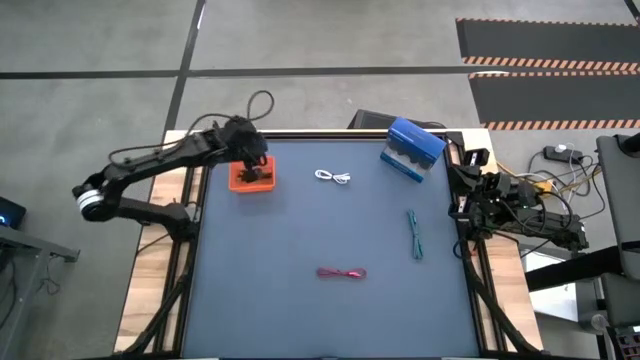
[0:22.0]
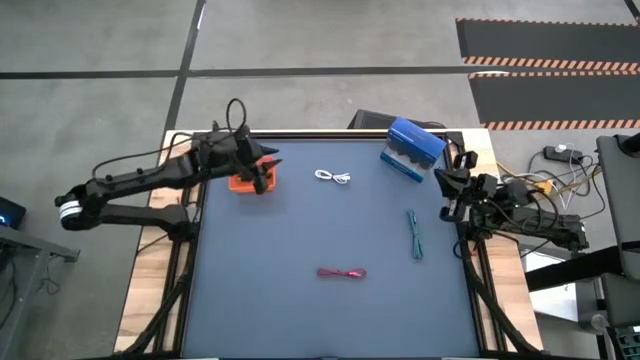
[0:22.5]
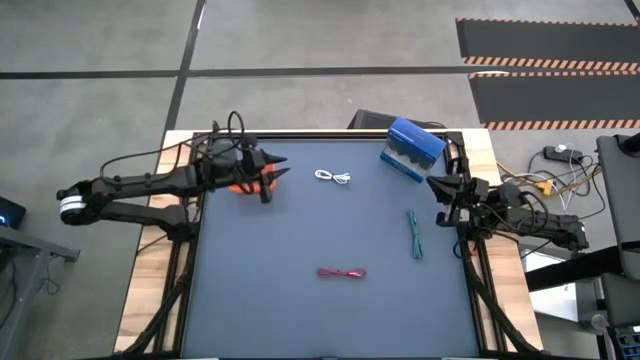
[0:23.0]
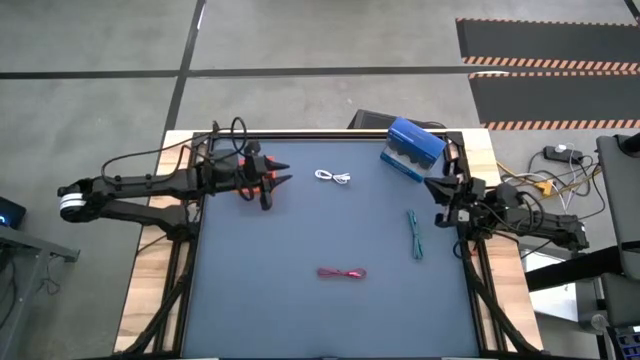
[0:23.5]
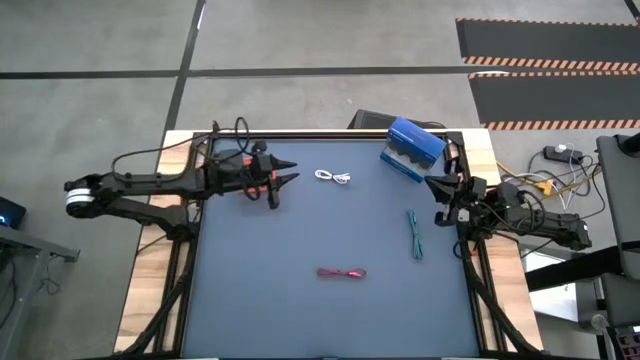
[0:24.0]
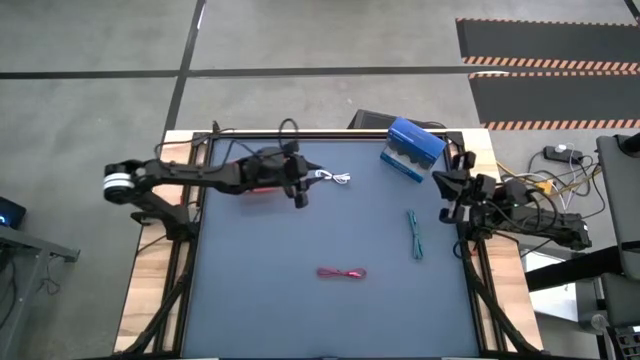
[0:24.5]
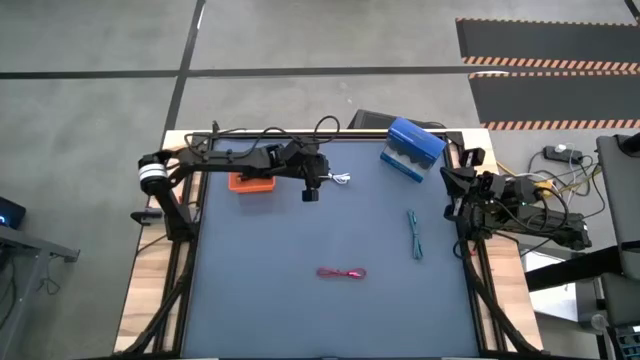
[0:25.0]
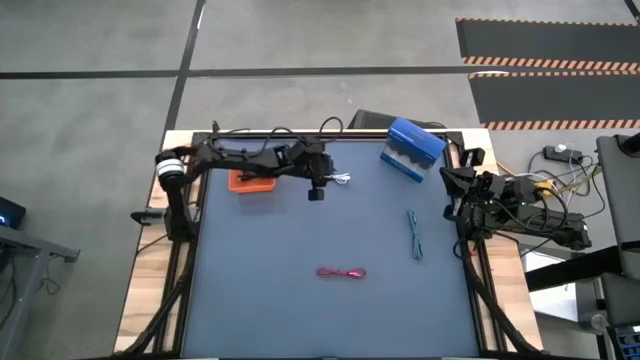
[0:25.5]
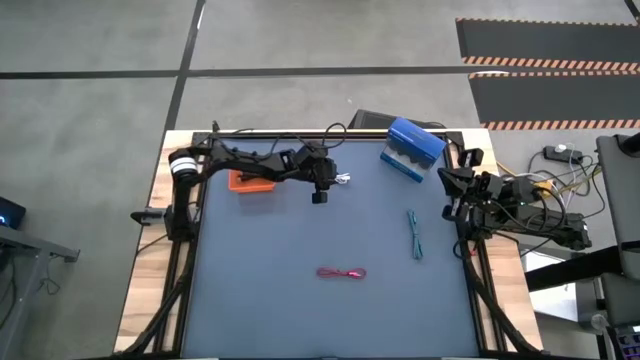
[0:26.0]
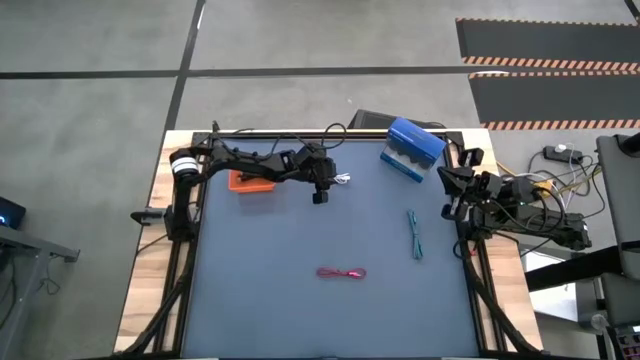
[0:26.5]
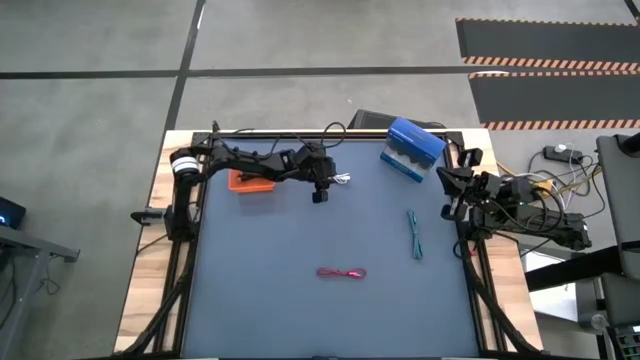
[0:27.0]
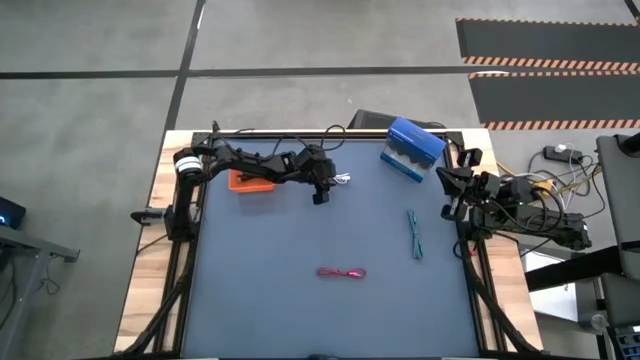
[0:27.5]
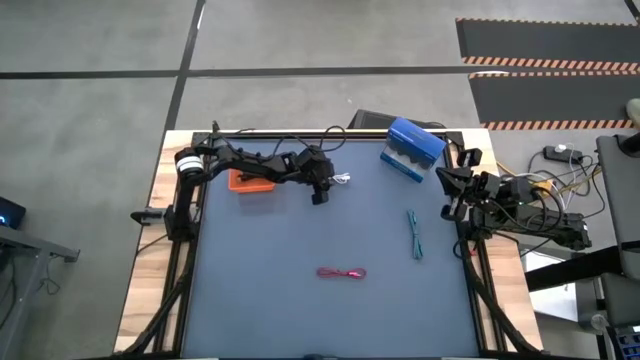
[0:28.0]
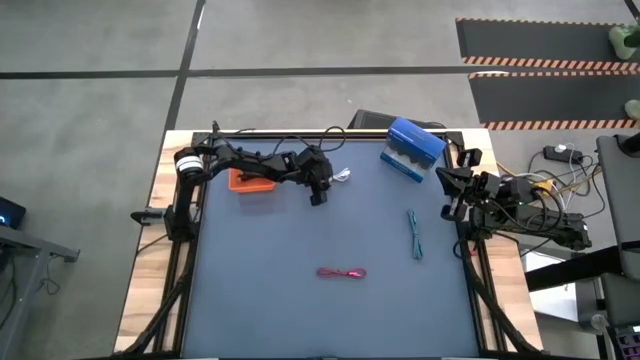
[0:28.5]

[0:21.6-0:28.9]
Task: Pick and place USB-C Cables
Put the white charger cable into the orange basket

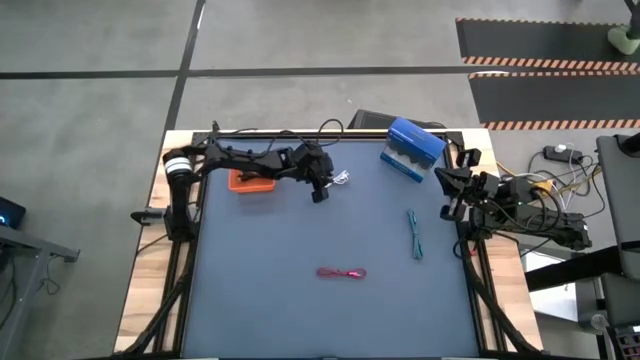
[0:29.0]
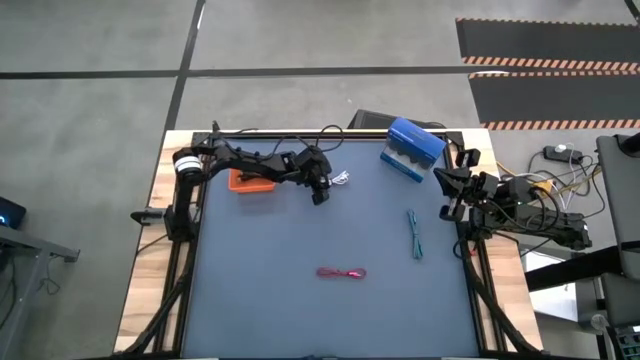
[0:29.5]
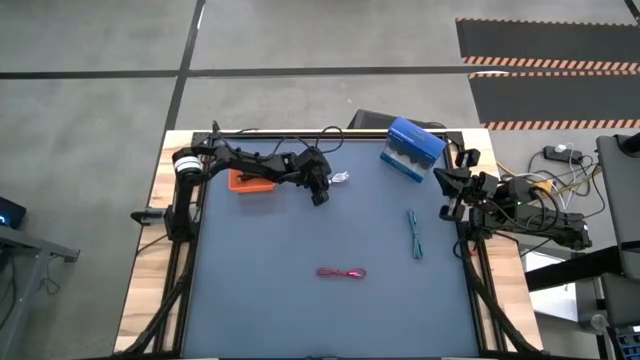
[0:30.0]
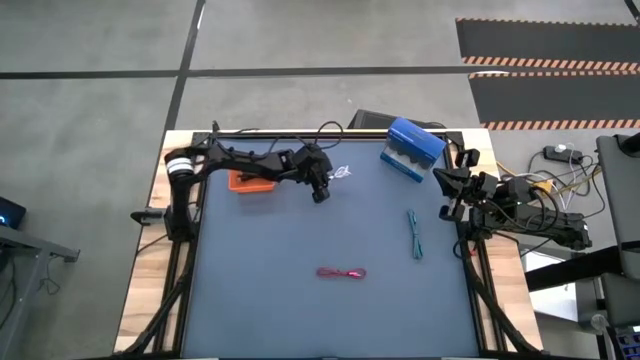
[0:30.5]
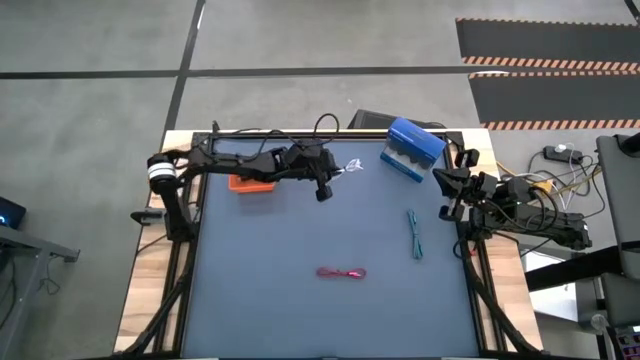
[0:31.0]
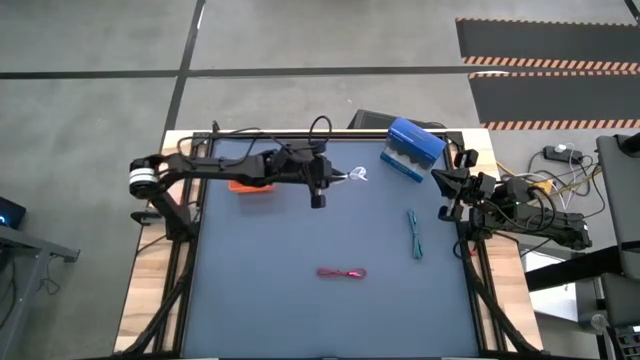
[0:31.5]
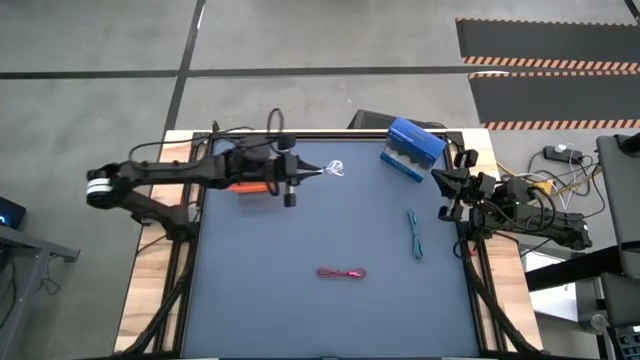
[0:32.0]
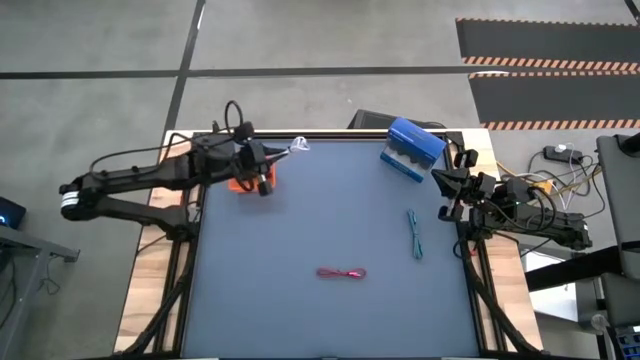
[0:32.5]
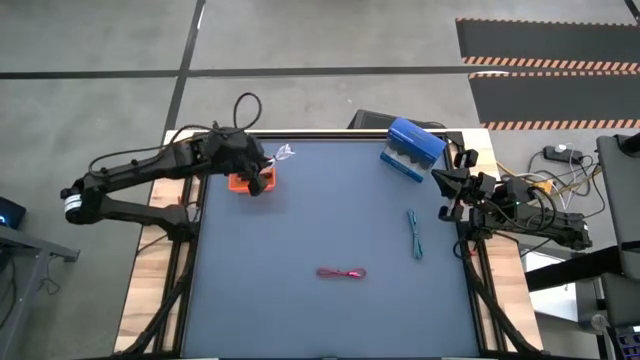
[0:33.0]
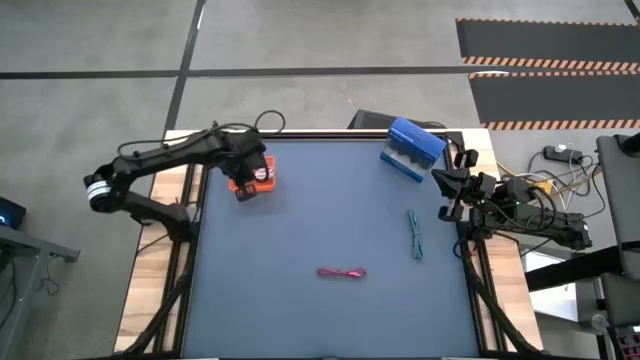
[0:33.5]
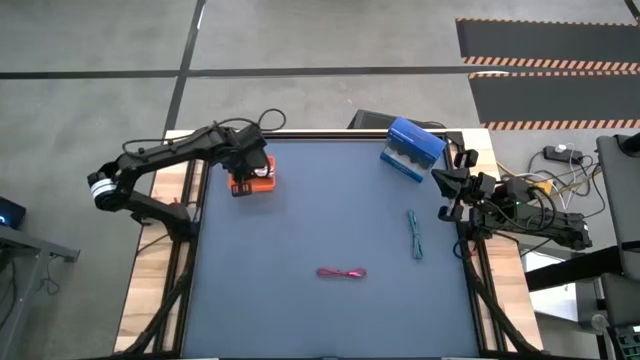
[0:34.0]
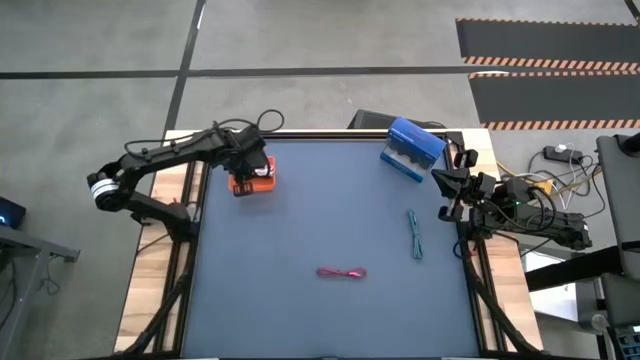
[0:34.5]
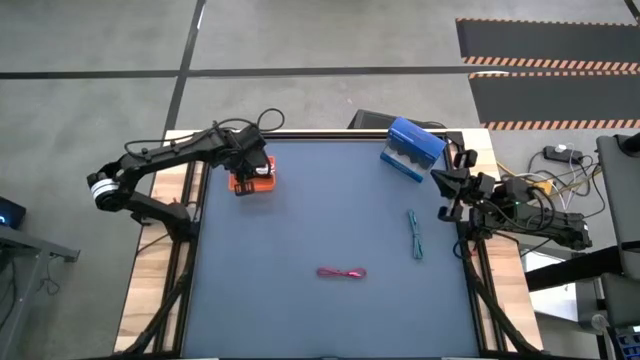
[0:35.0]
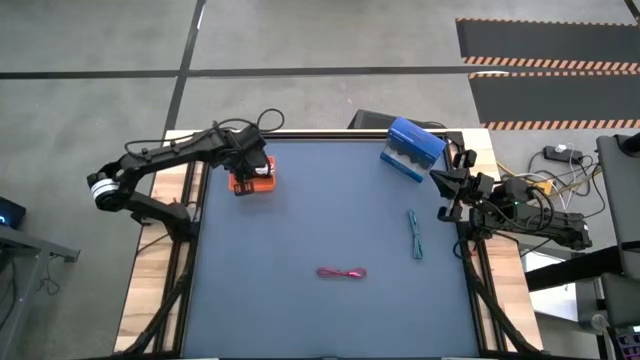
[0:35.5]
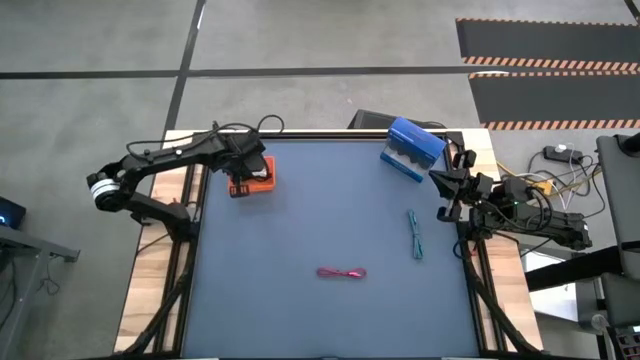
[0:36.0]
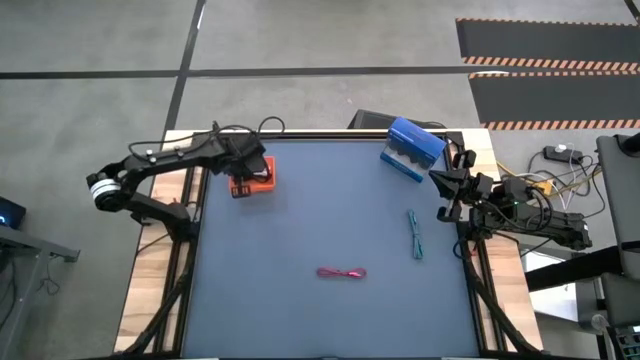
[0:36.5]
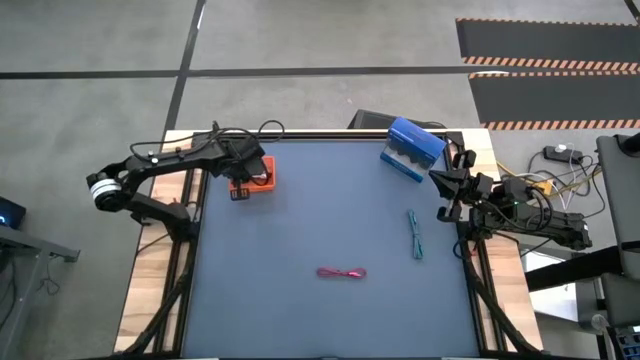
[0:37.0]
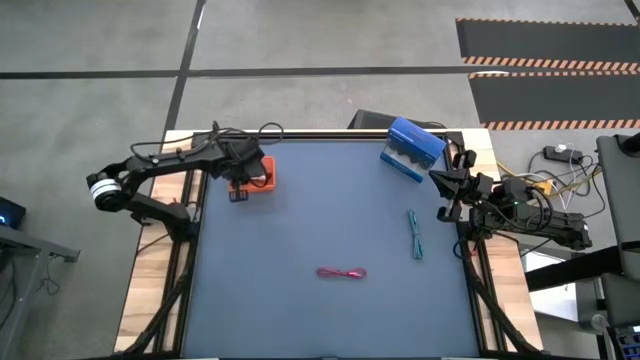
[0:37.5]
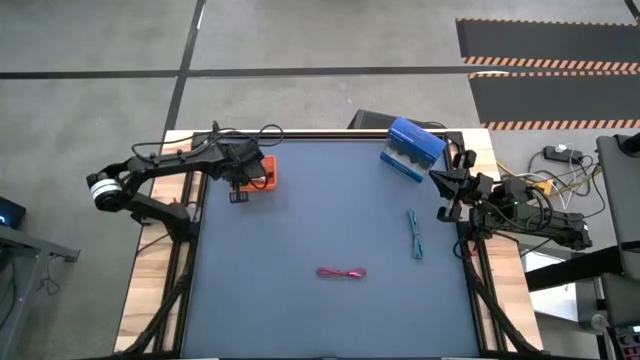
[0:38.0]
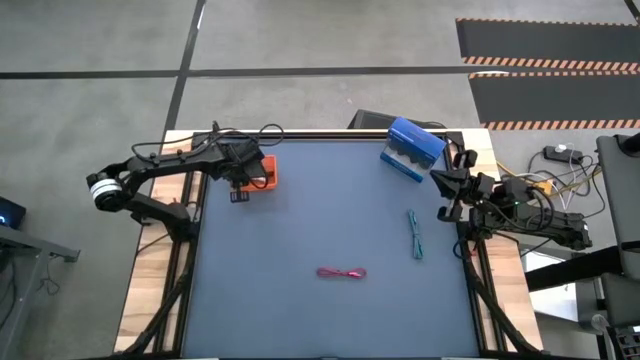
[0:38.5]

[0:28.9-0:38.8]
Put the white charger cable into the orange basket

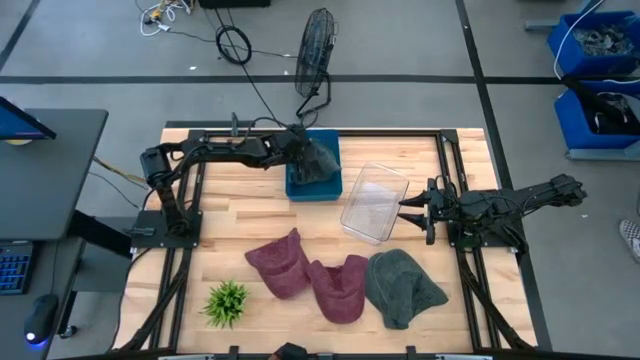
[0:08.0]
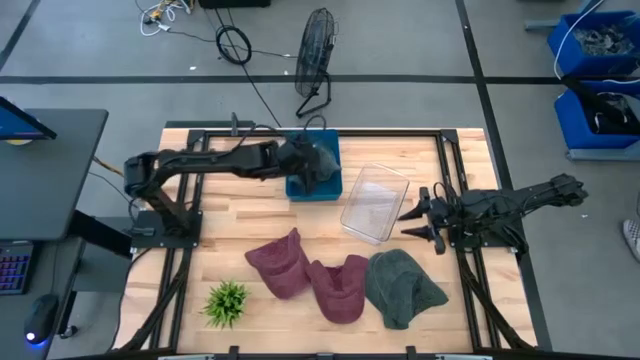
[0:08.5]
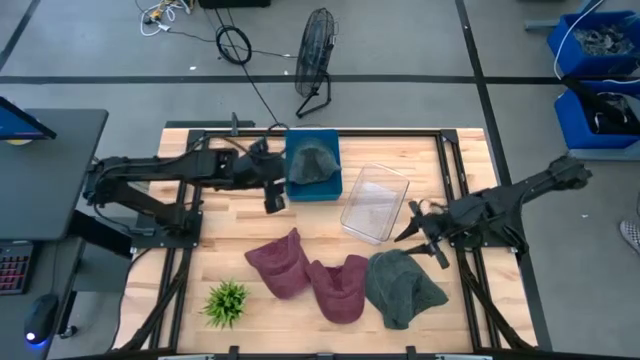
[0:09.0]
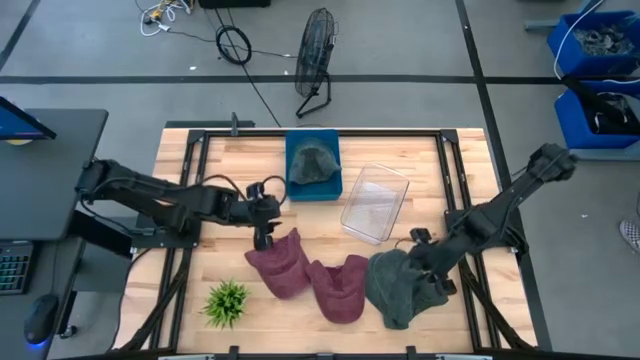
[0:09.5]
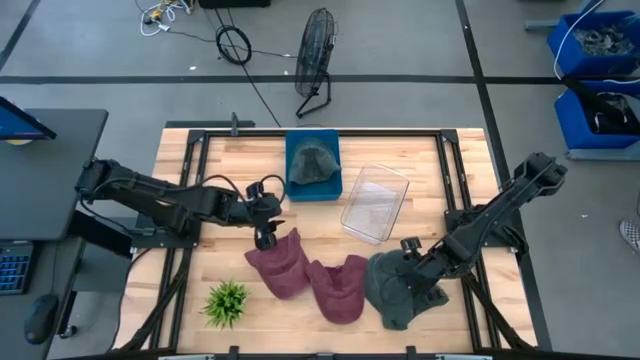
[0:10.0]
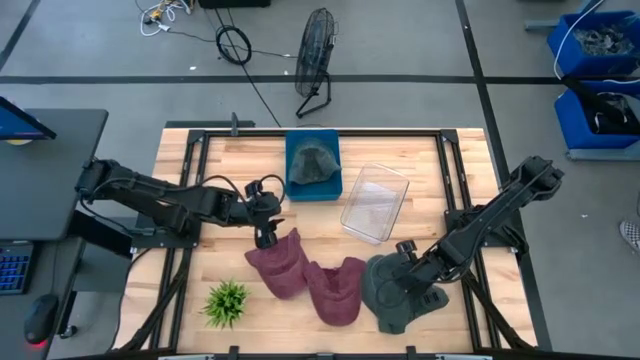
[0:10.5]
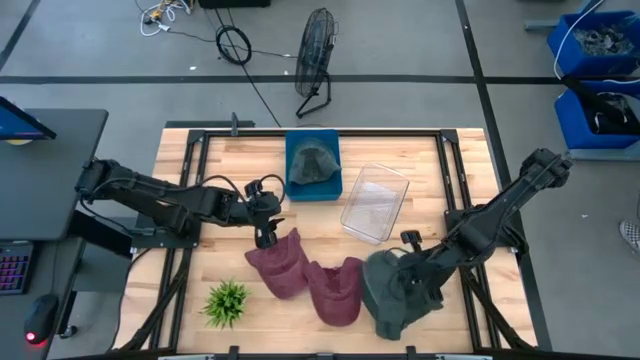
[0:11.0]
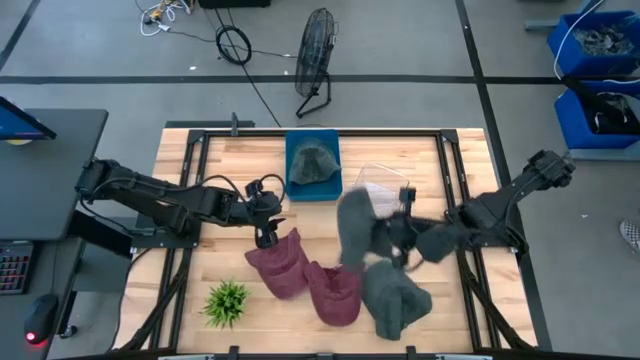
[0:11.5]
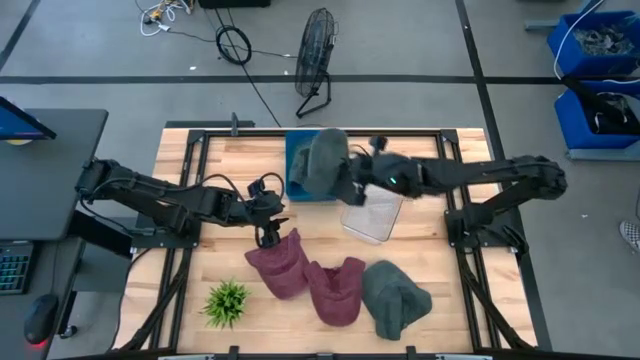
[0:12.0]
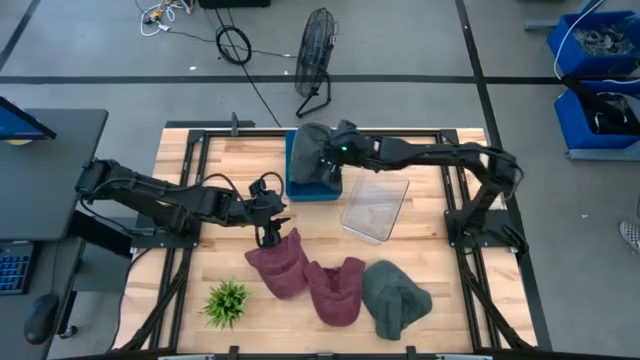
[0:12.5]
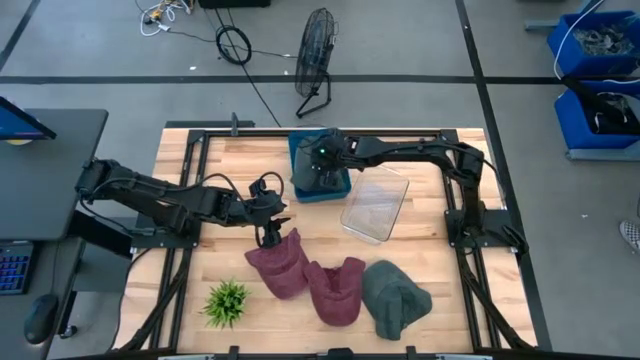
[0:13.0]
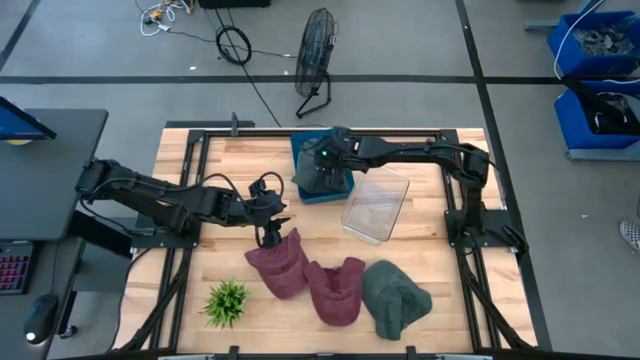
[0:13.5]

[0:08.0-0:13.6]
Task: Pick & Place hat
Put the gray cap into the blue bin
